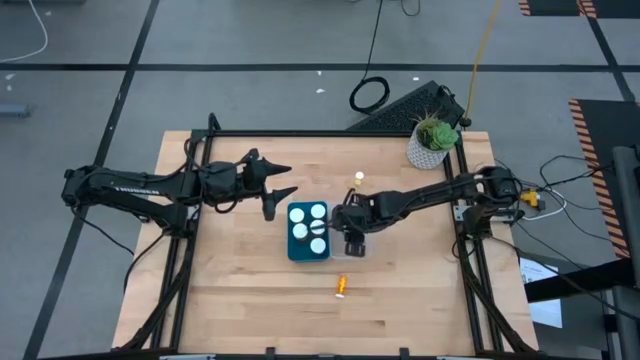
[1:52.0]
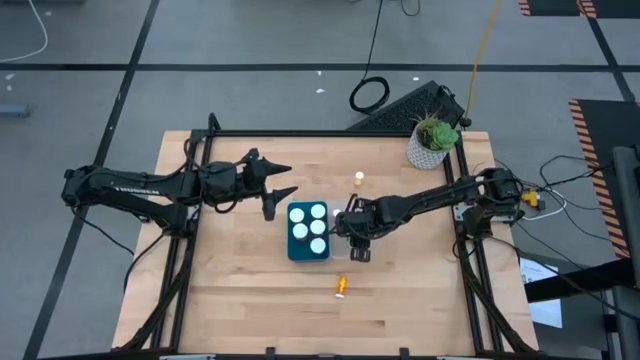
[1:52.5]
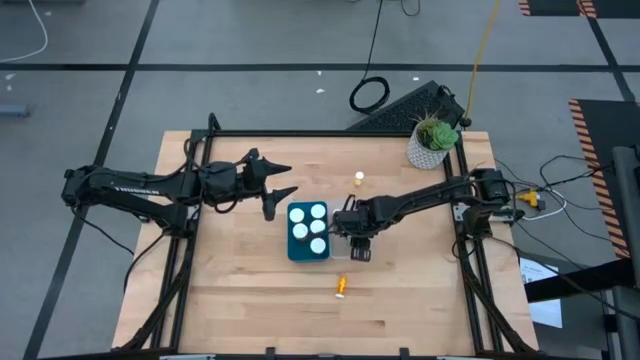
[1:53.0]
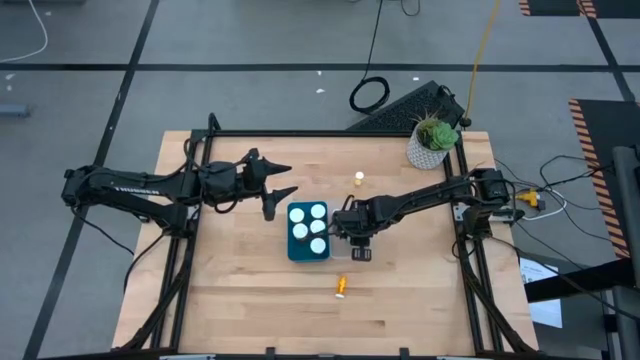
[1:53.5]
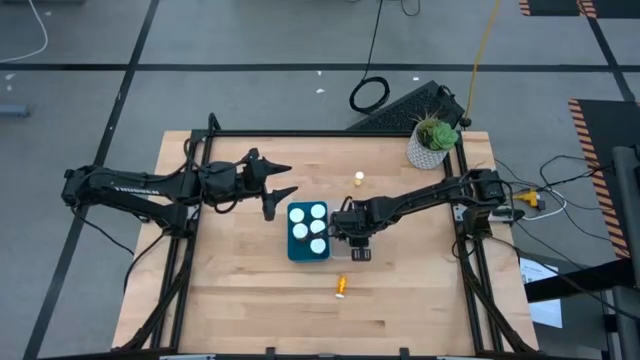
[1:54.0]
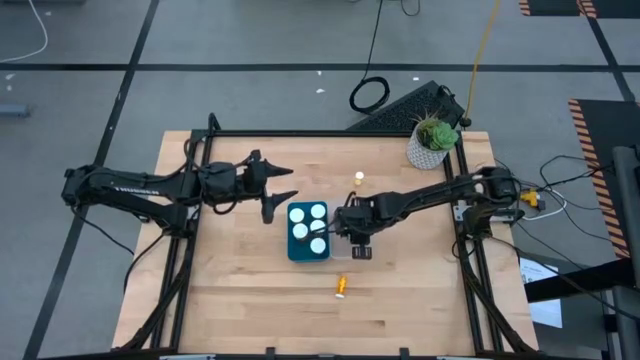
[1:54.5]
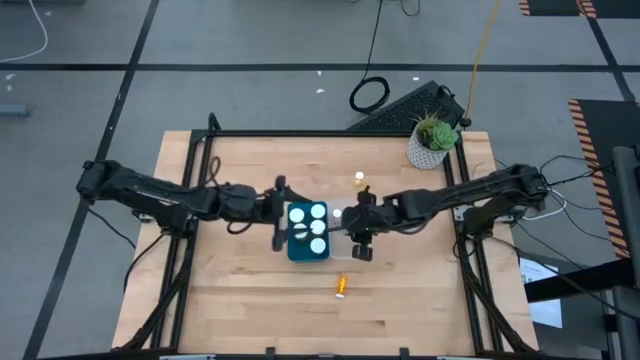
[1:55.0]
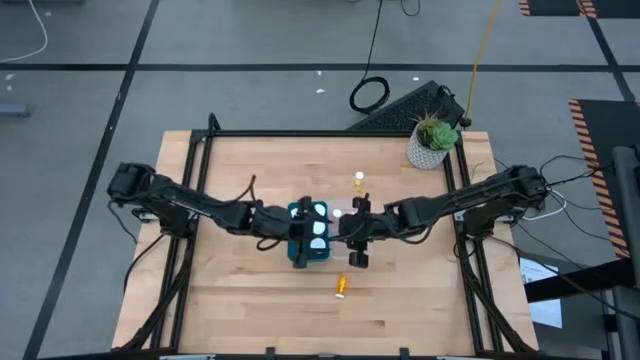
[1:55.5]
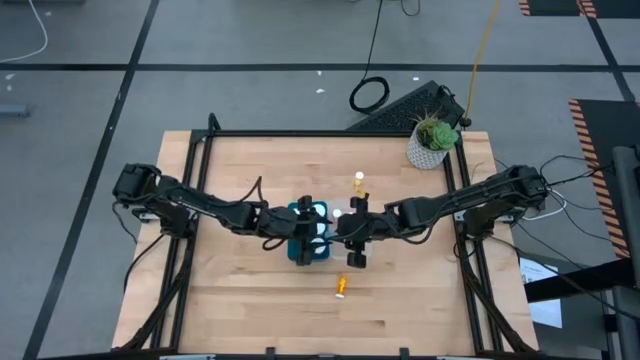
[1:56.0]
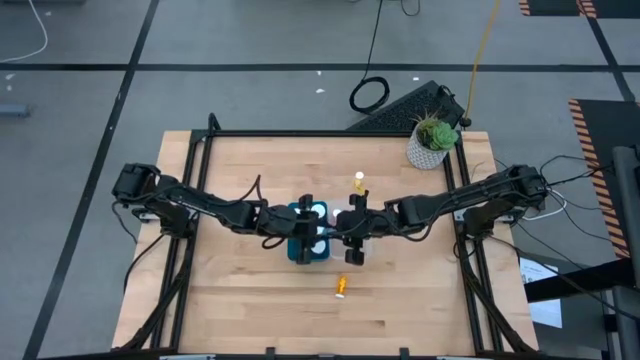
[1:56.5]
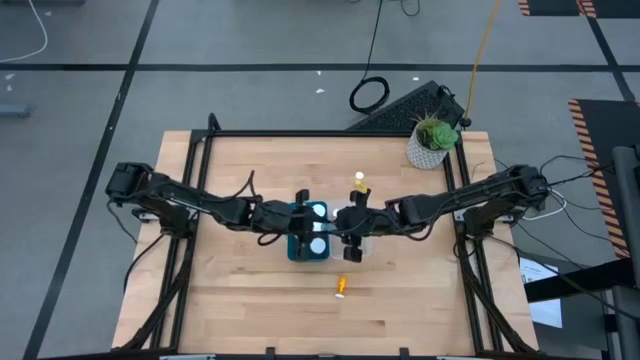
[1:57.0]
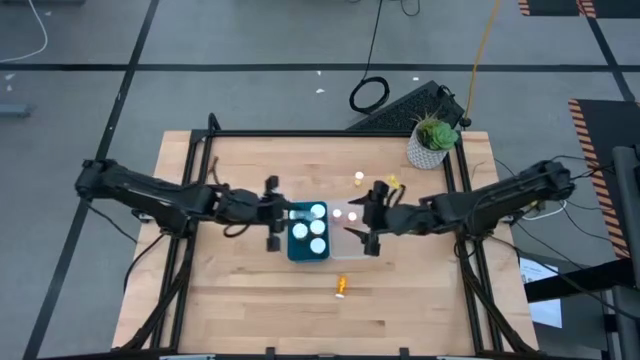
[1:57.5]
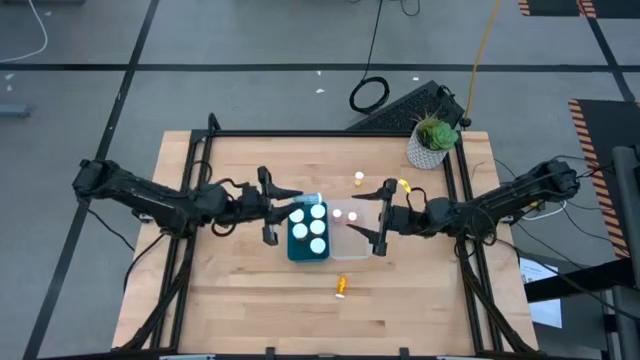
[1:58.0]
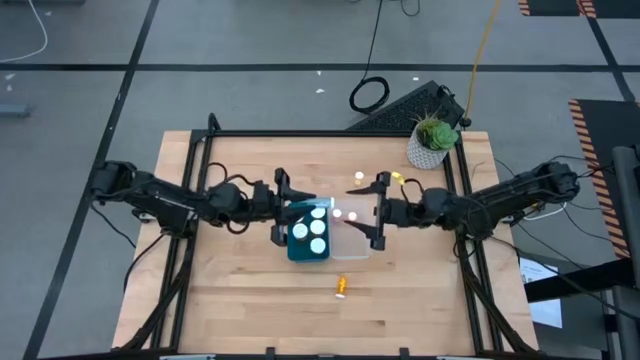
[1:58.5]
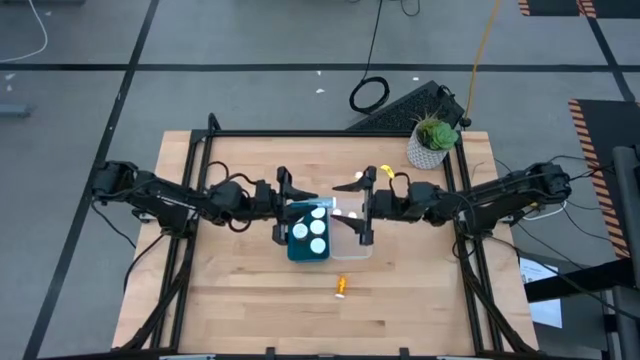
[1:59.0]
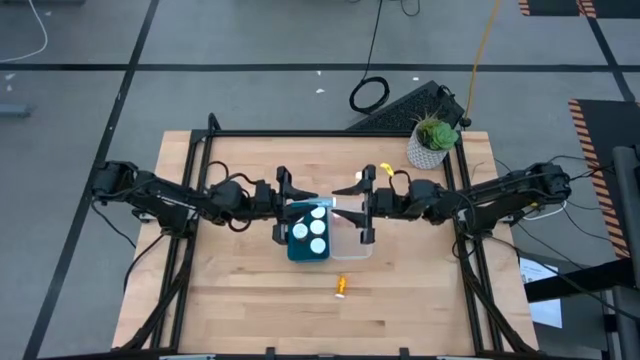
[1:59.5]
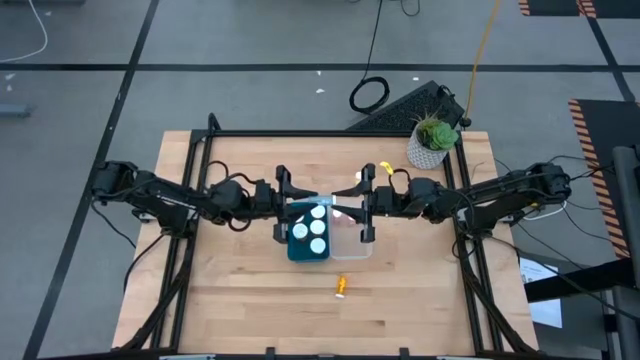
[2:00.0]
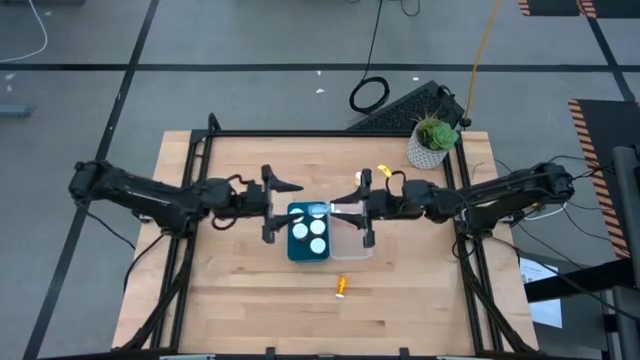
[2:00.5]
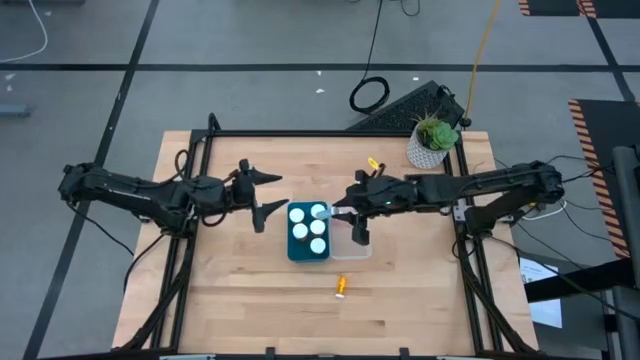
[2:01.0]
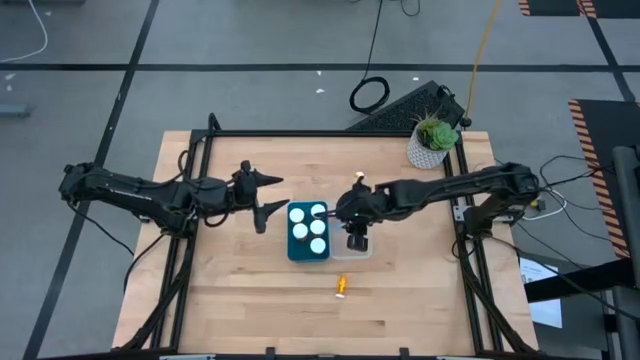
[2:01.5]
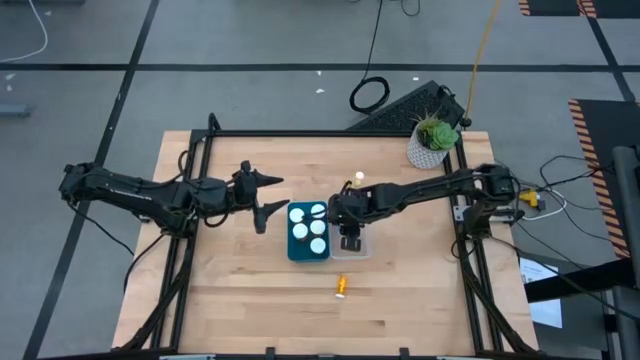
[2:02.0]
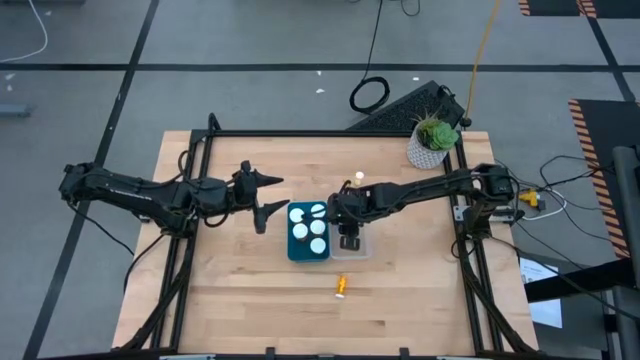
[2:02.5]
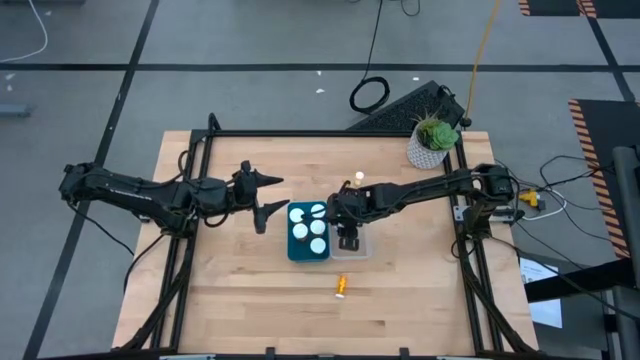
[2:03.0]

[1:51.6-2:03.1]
Task: Pick and place medicine bottles into bin by pill shape (circle, oval)
Put the small blue pill bottle into the transparent bin

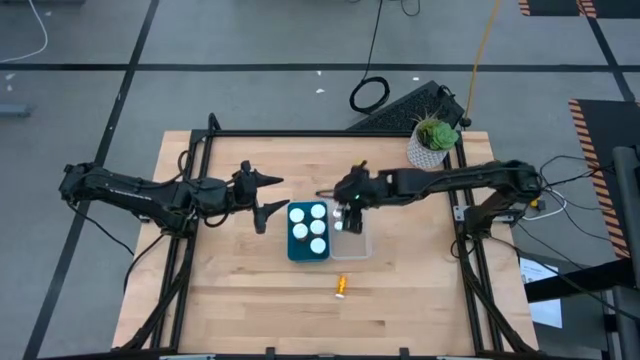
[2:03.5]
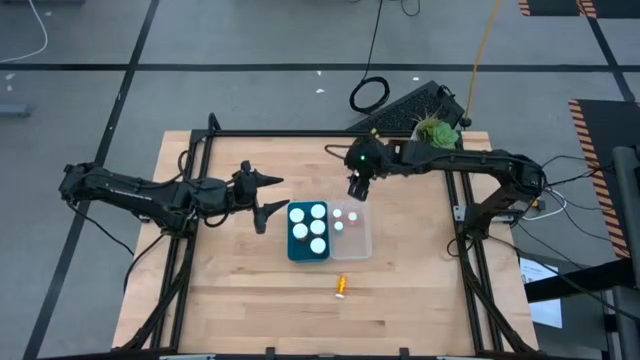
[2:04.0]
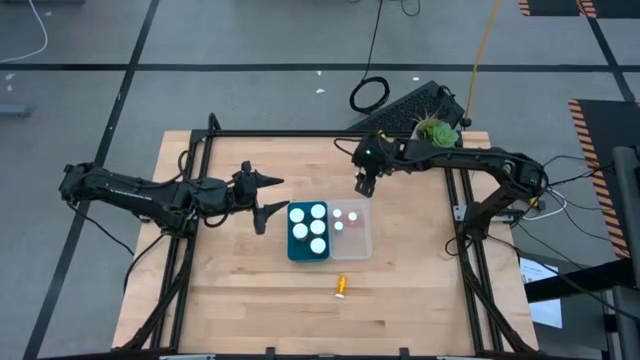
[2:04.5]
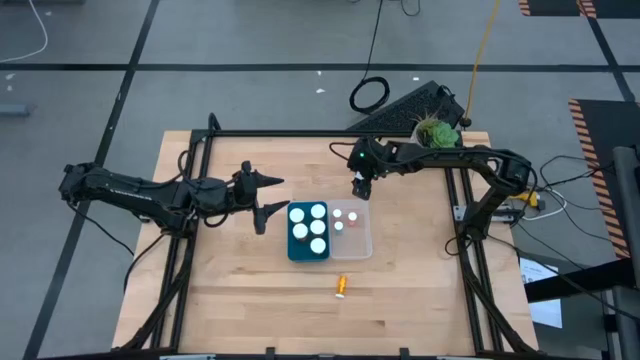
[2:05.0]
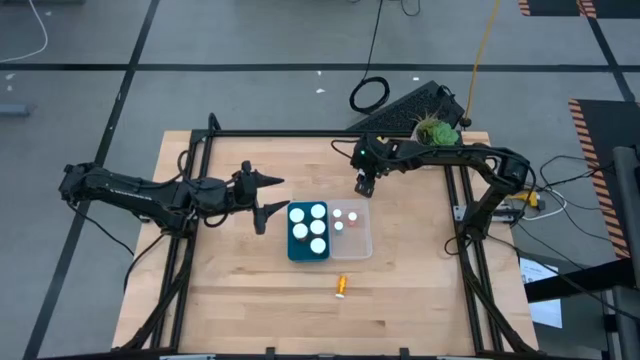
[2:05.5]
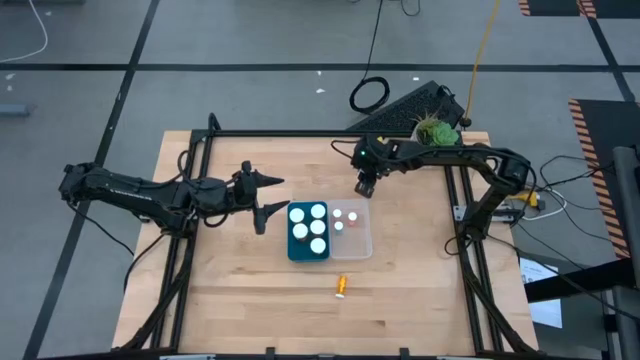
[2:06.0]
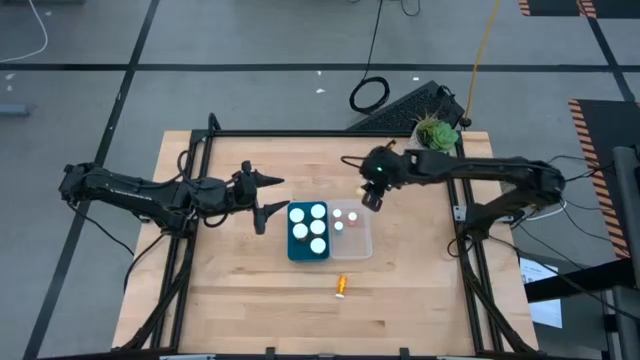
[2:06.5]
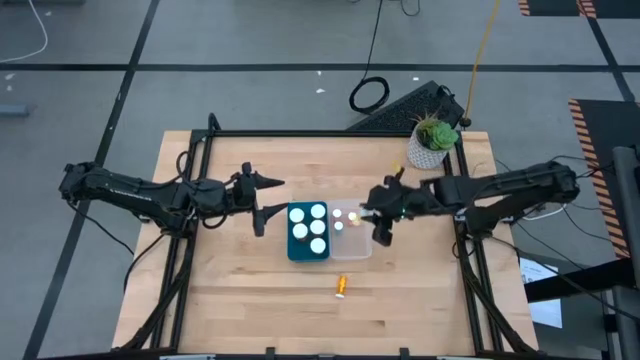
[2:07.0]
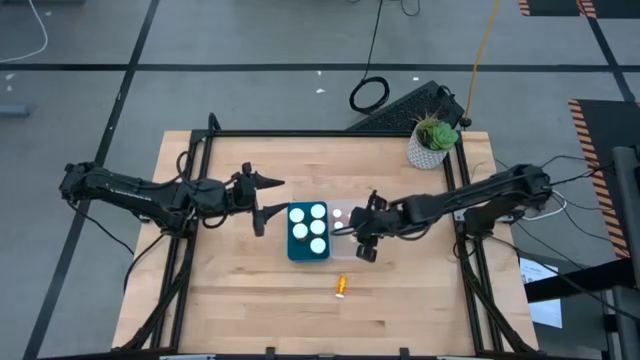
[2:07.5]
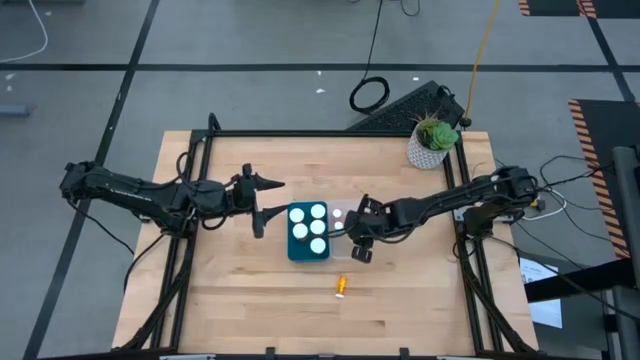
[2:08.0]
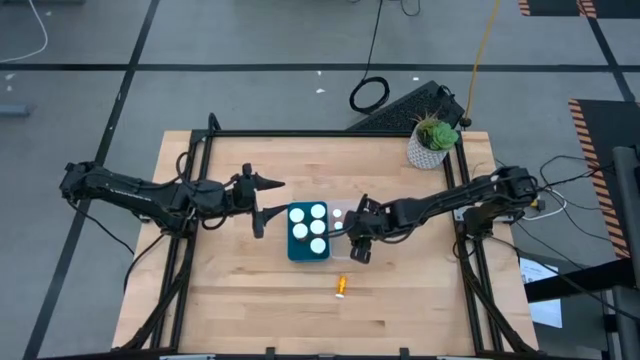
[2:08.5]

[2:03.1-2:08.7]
Put the small yellow pill bottle into the transparent bin

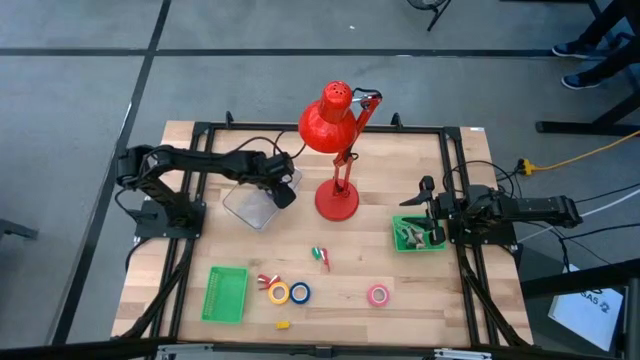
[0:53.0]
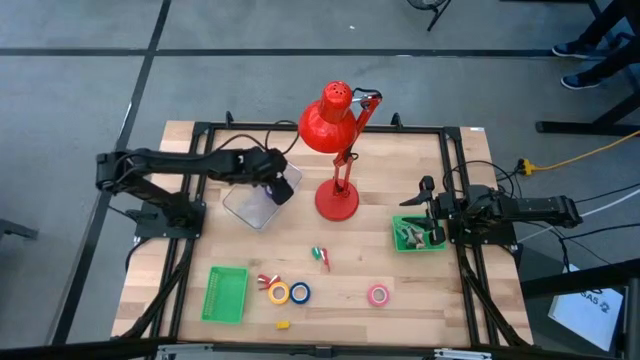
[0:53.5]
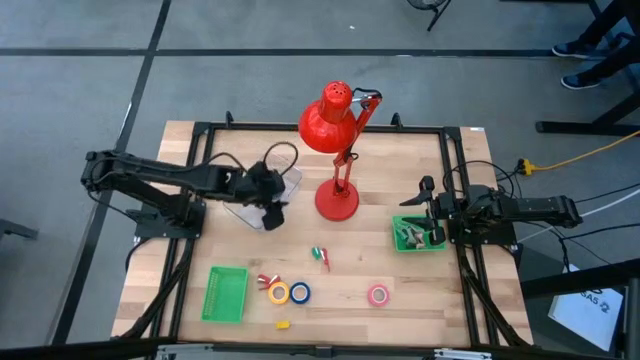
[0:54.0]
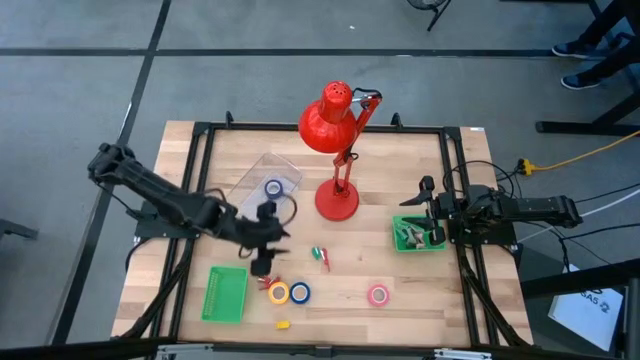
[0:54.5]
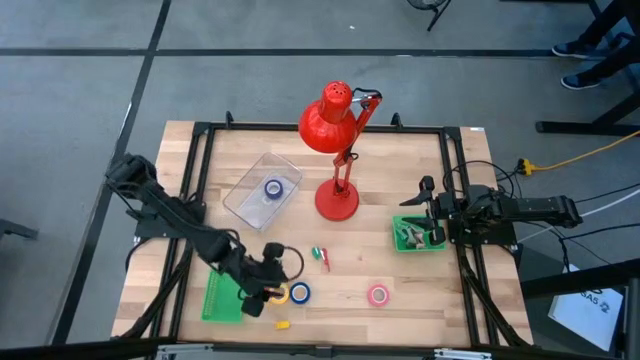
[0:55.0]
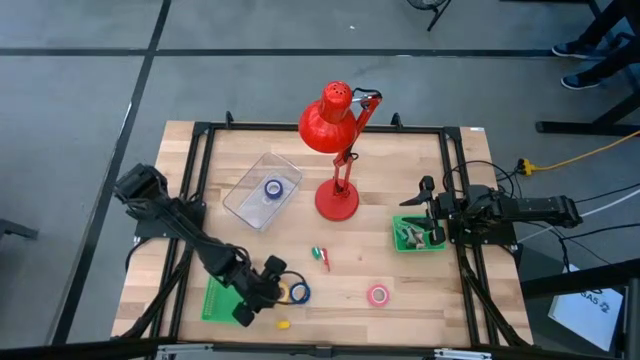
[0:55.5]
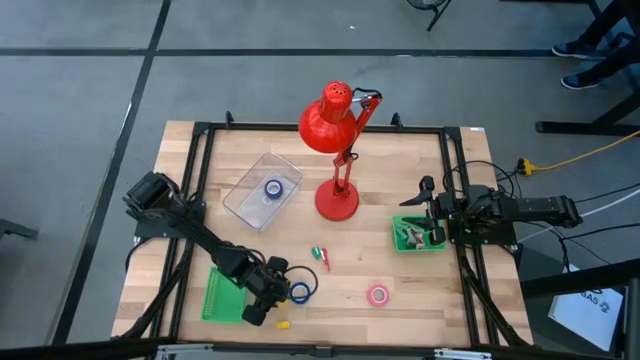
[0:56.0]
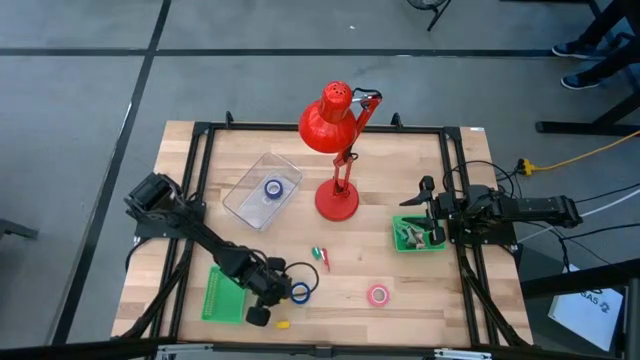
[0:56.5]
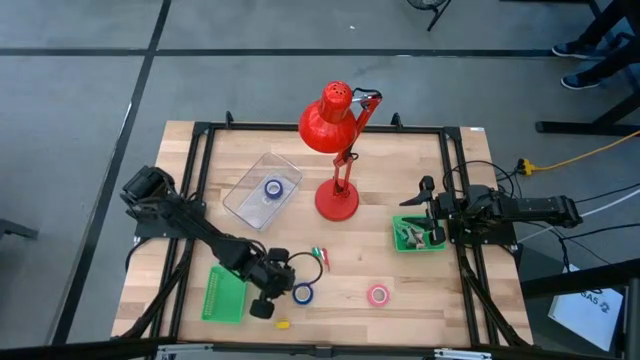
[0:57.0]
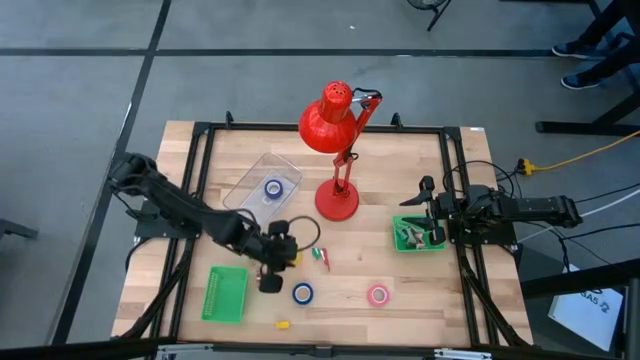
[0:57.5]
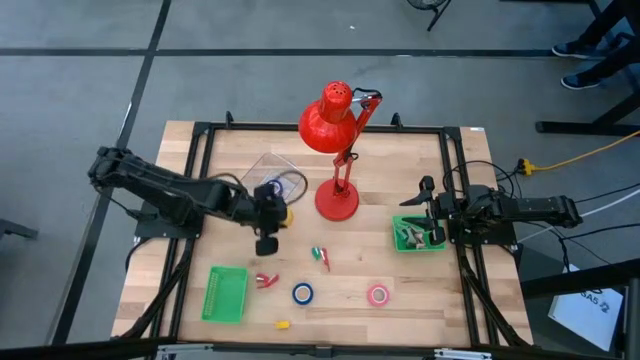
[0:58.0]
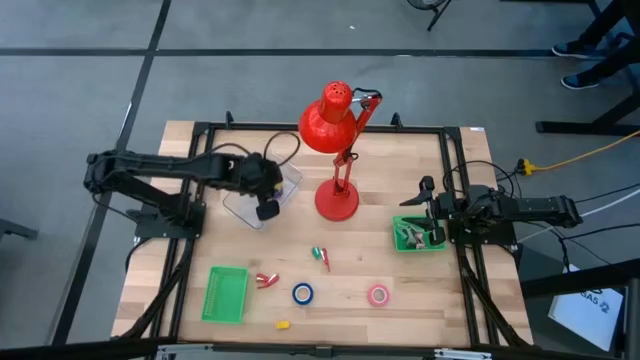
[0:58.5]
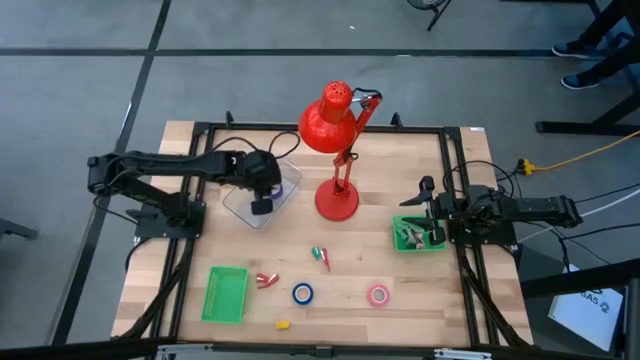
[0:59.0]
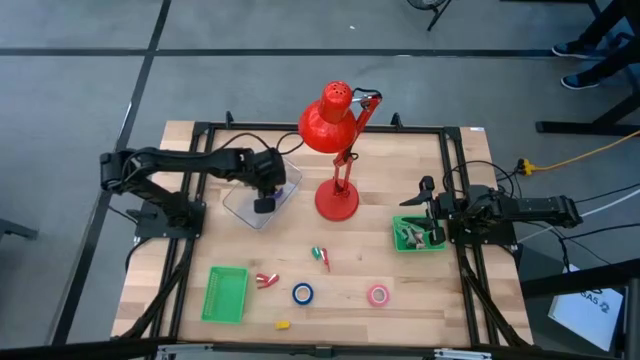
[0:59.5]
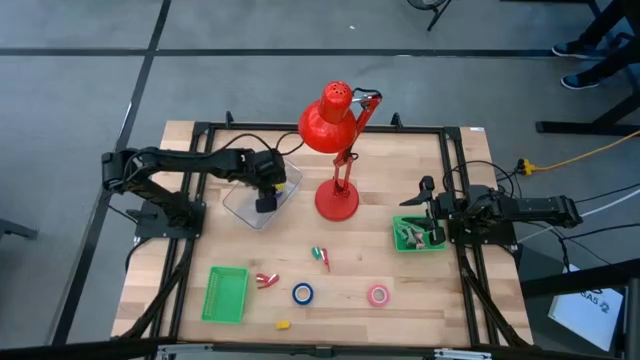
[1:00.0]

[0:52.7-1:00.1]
Task: Pick and place Stapler, Stapler remover, tape
Put the yellow tape into the transparent bin
